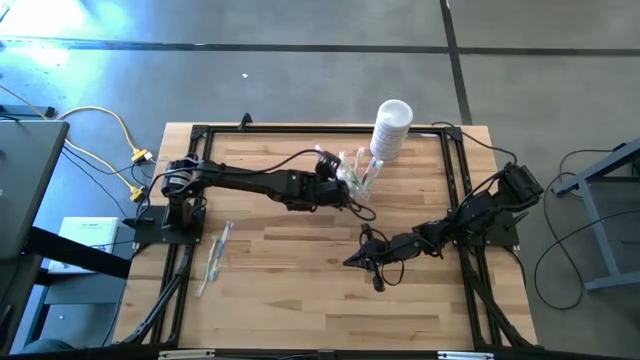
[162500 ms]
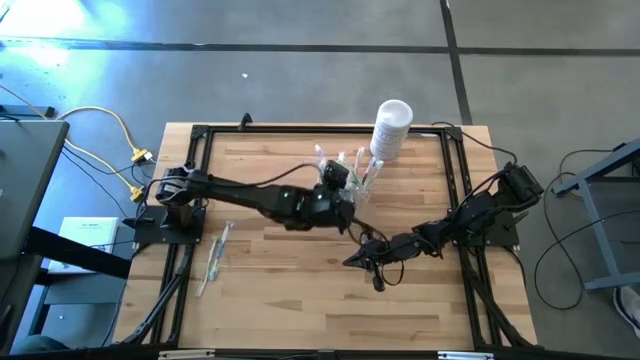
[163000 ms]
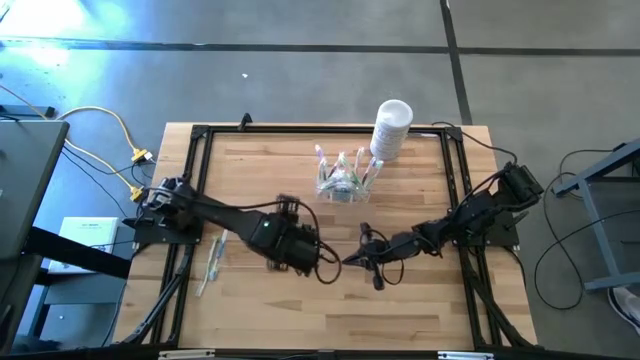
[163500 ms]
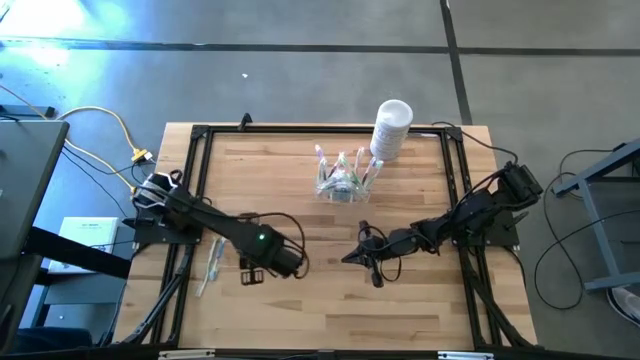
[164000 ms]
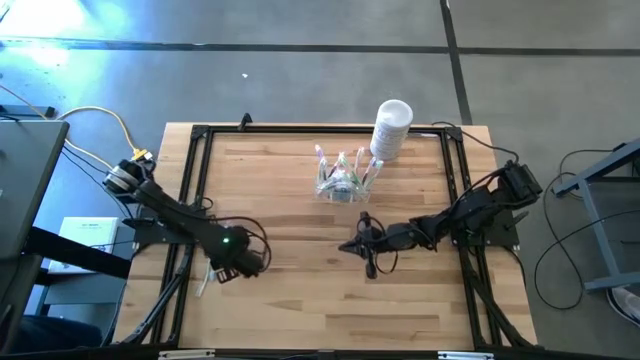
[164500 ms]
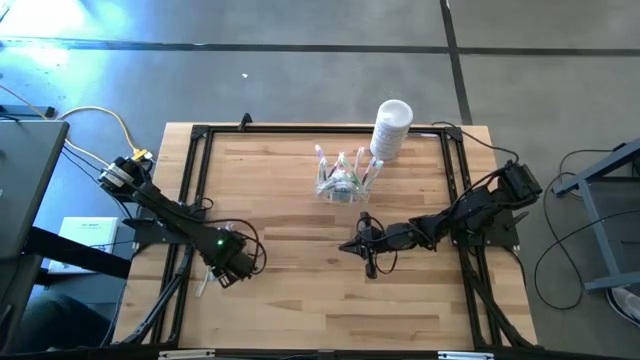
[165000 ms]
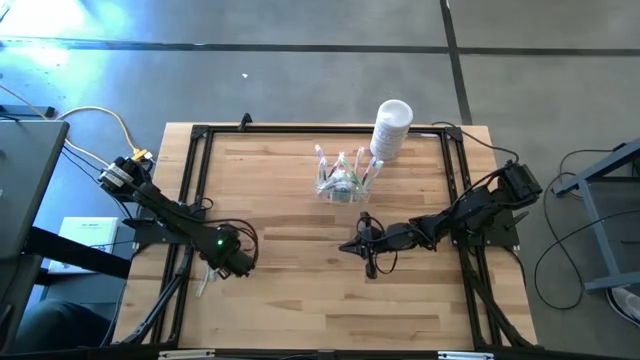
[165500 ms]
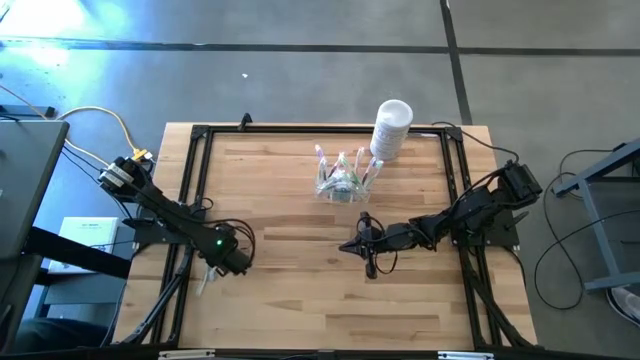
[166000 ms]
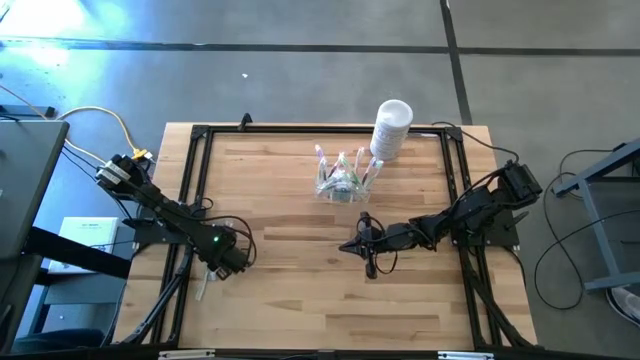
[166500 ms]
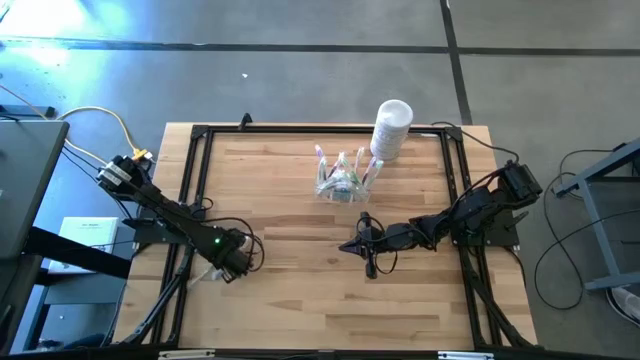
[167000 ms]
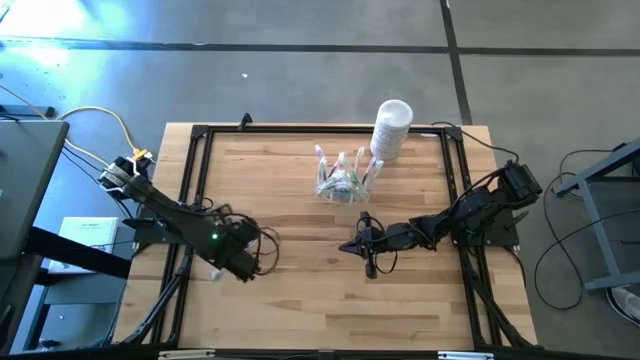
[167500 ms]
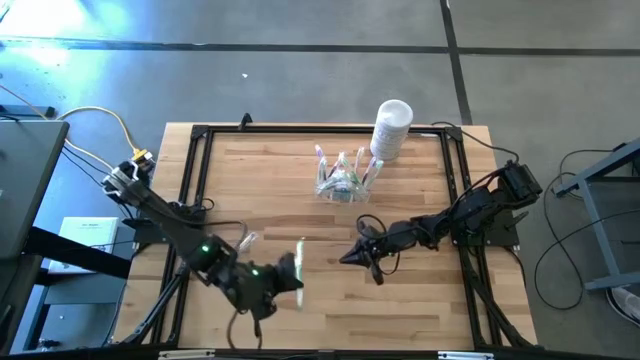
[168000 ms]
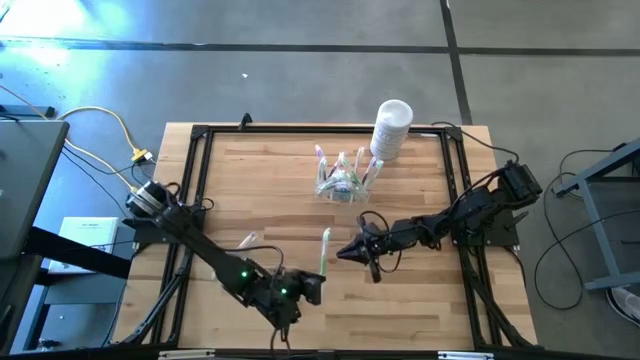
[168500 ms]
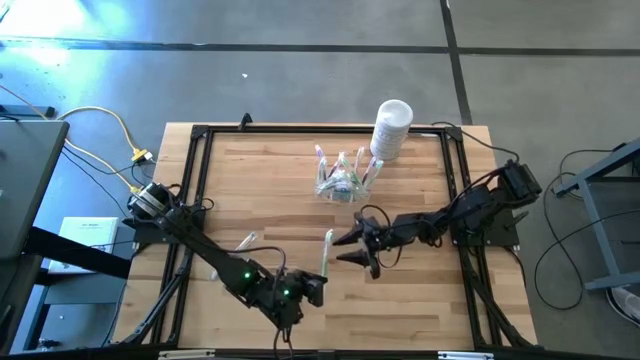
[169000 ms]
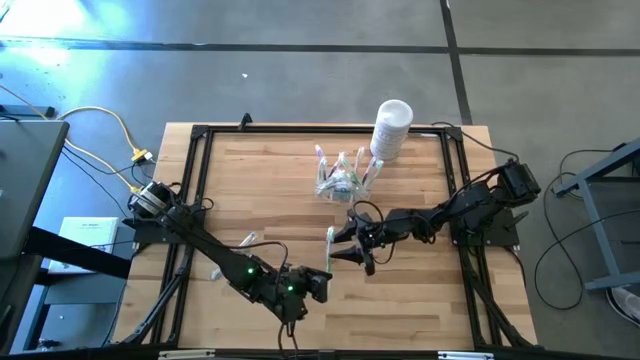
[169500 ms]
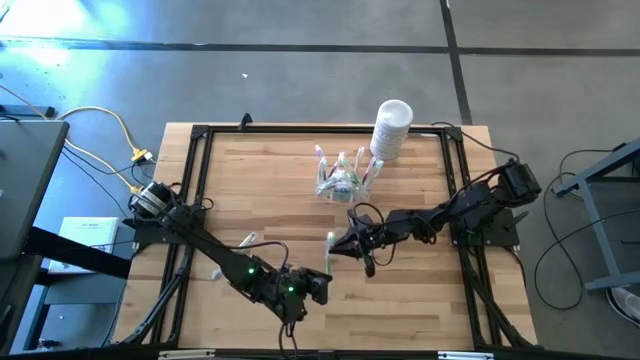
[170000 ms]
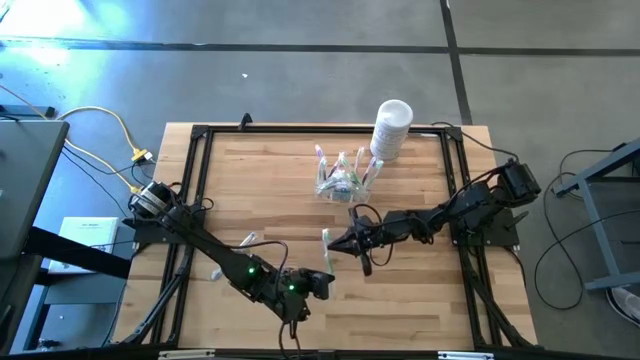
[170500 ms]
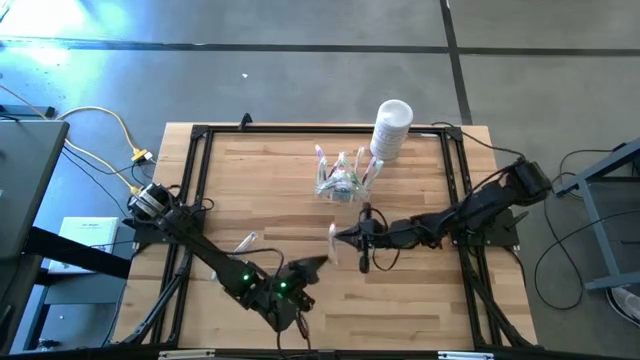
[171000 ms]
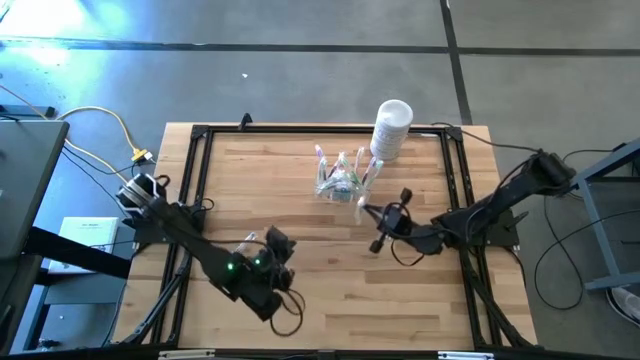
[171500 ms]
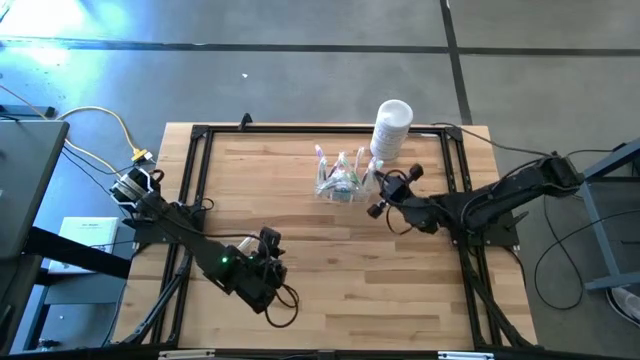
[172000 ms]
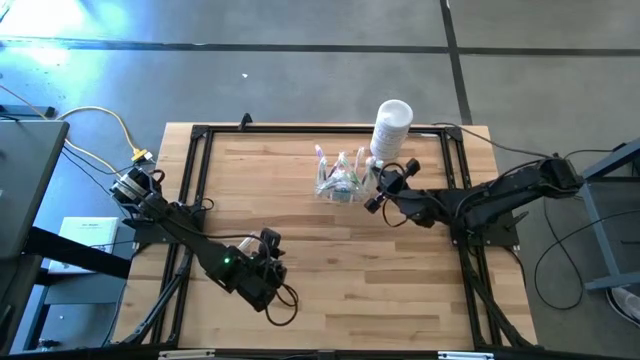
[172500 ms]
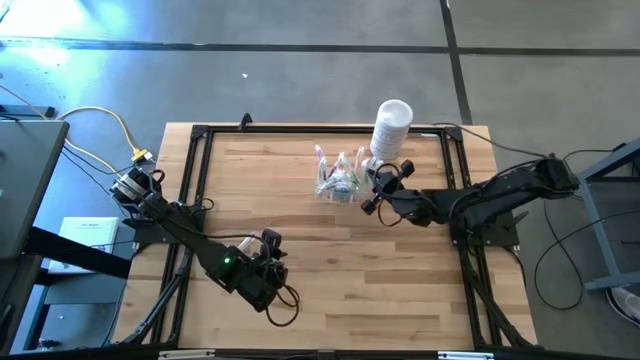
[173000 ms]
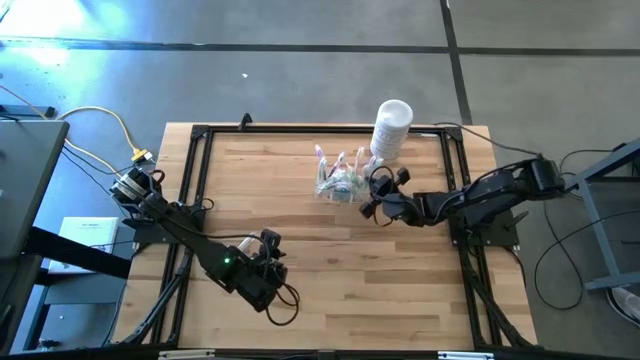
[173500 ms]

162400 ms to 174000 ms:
Task: Pick & Place toothbrushing station
Put the green toothbrush into the transparent organizer

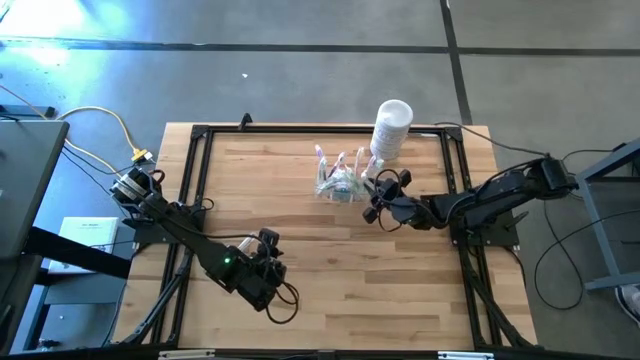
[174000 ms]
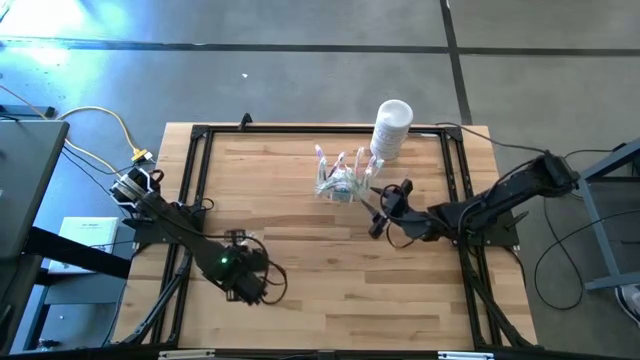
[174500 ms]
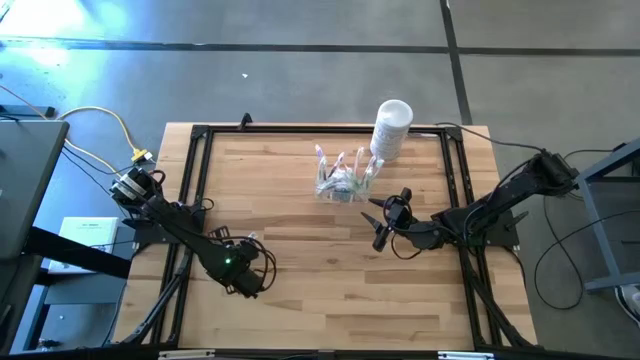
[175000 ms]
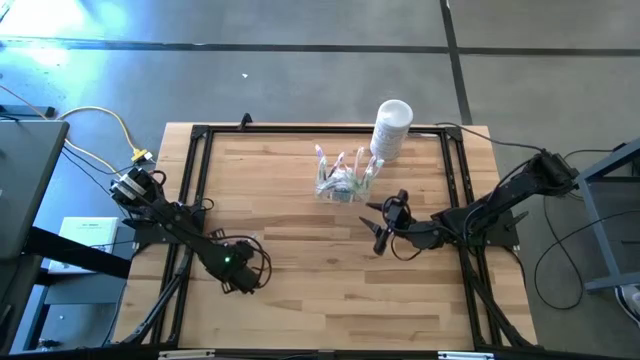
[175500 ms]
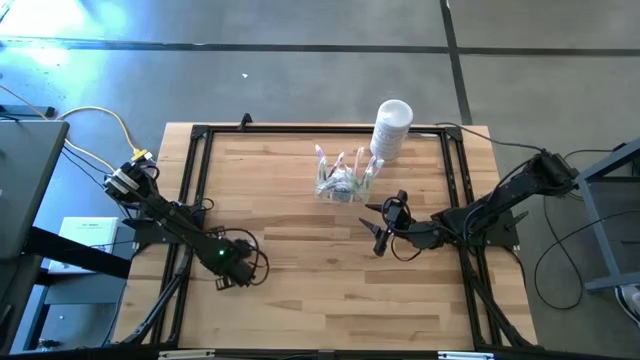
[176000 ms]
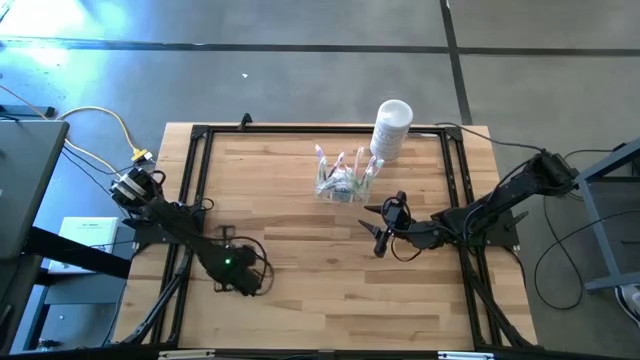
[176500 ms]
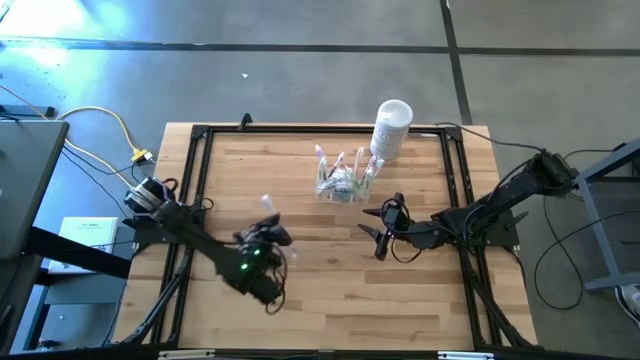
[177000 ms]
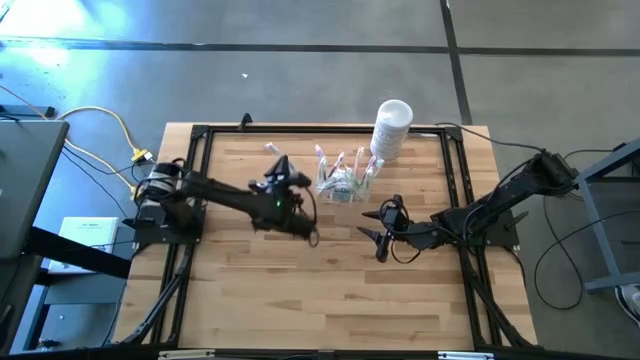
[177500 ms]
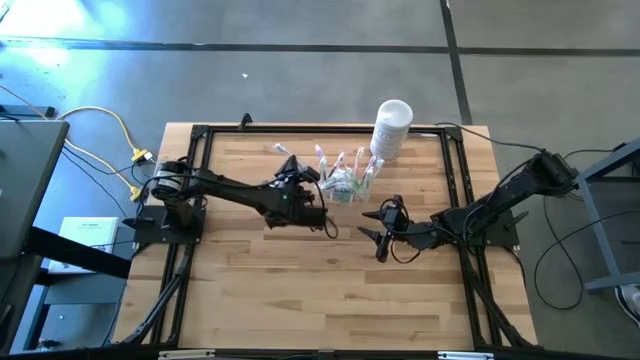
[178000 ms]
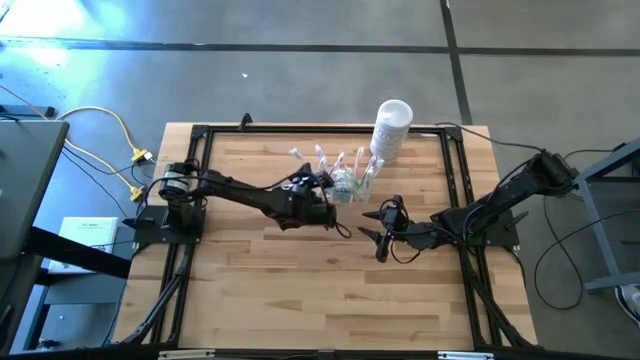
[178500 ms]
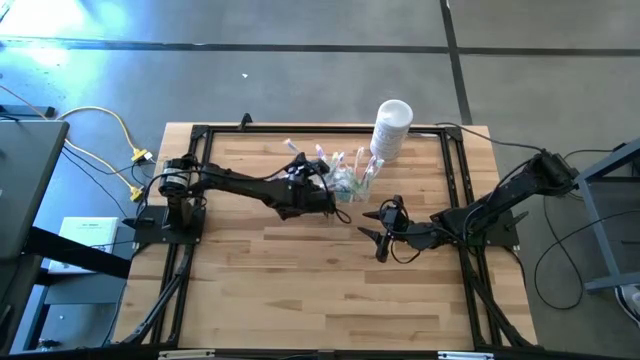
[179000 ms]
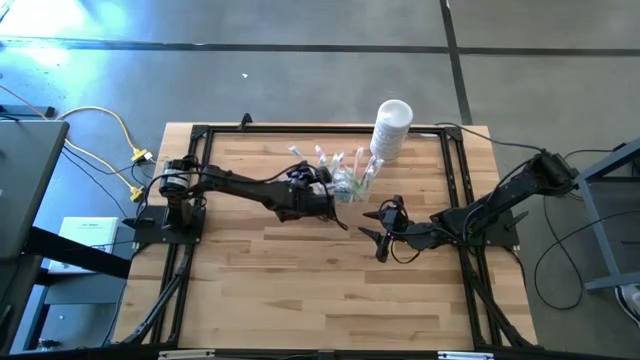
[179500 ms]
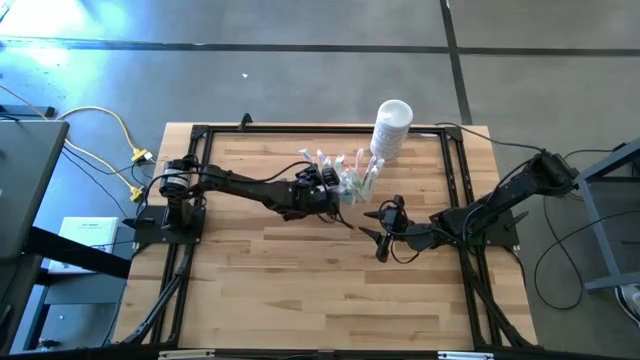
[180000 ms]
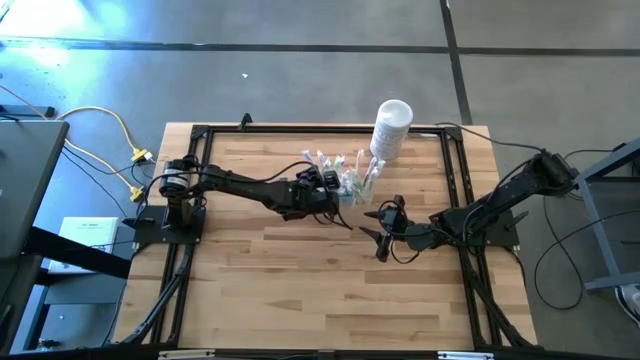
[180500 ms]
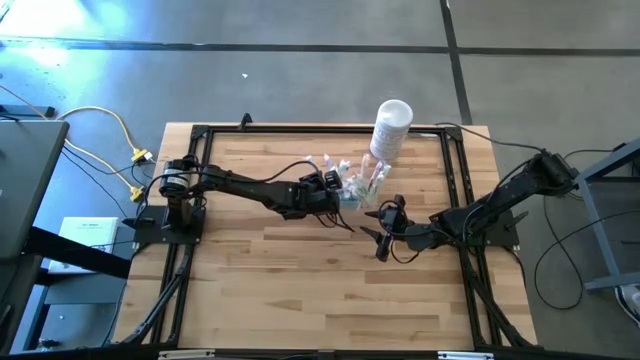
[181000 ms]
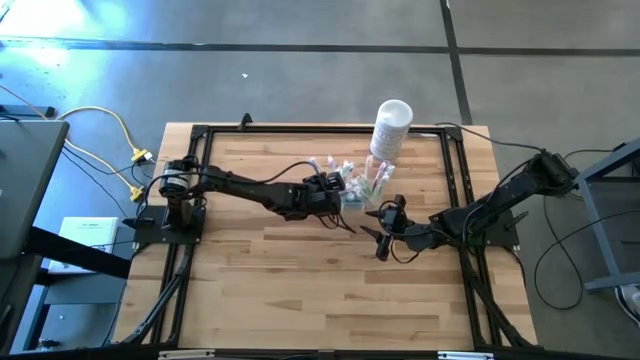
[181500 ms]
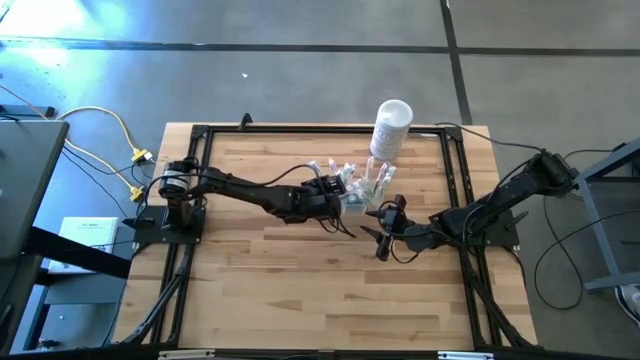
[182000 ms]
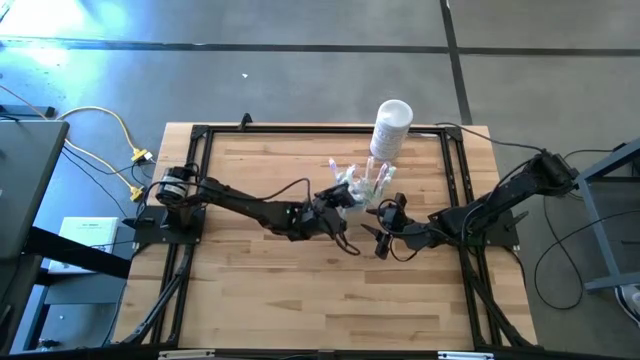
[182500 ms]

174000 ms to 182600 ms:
Put the blue toothbrush into the transparent organizer
